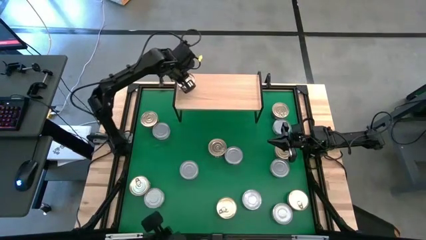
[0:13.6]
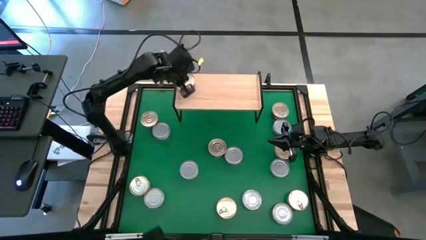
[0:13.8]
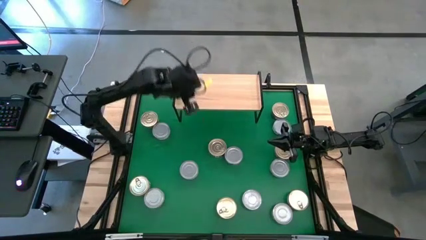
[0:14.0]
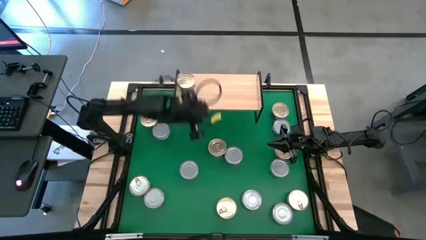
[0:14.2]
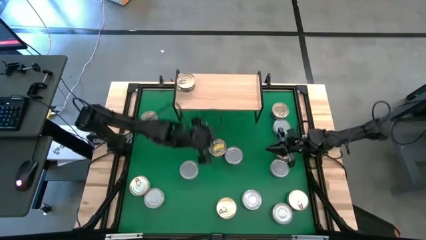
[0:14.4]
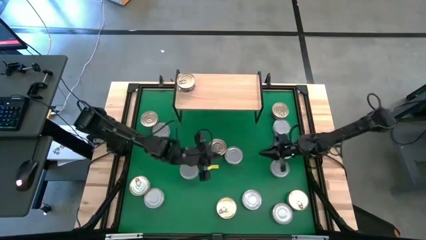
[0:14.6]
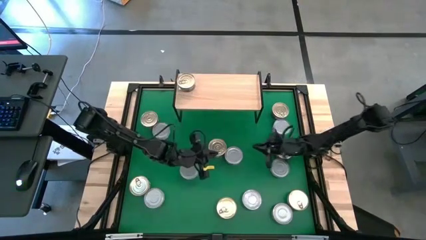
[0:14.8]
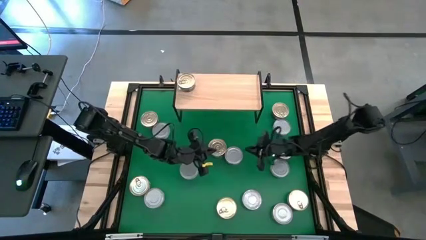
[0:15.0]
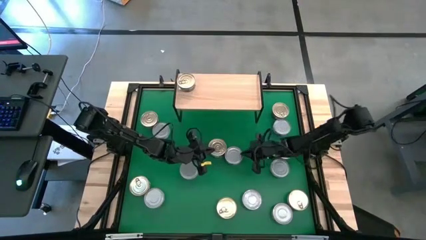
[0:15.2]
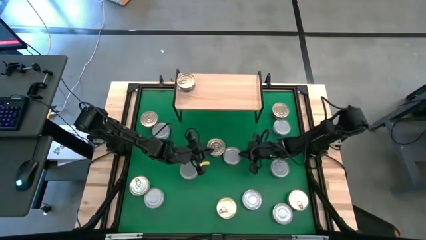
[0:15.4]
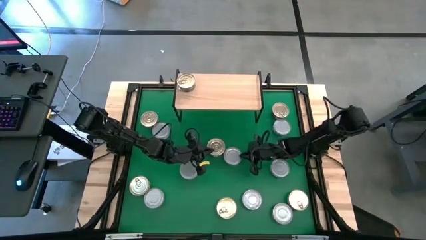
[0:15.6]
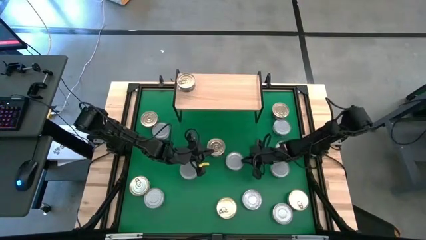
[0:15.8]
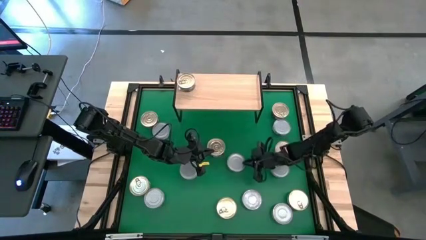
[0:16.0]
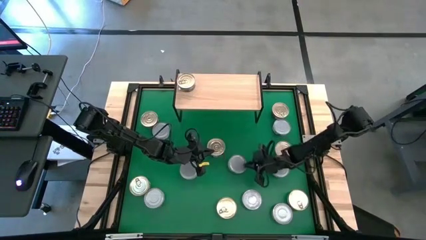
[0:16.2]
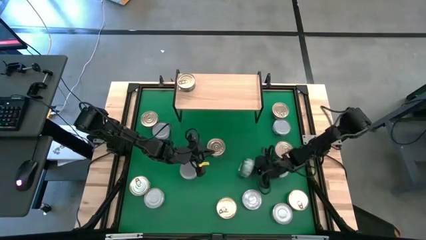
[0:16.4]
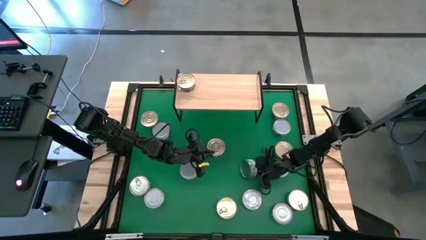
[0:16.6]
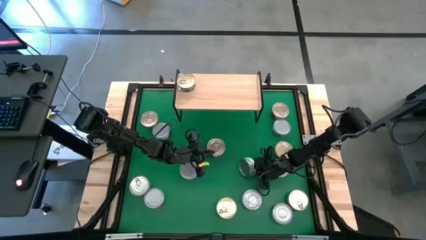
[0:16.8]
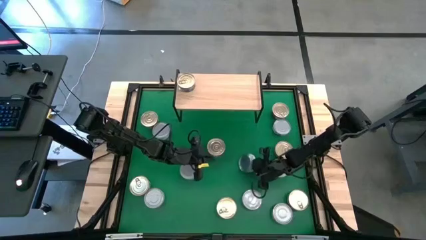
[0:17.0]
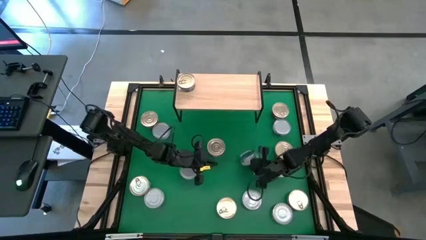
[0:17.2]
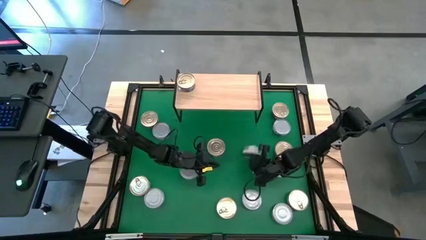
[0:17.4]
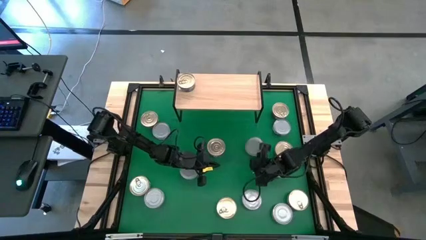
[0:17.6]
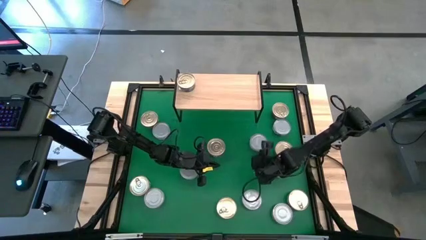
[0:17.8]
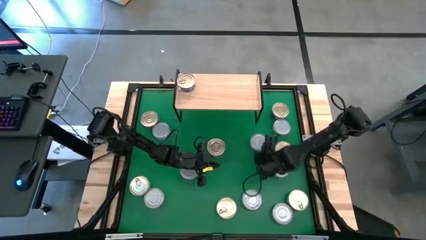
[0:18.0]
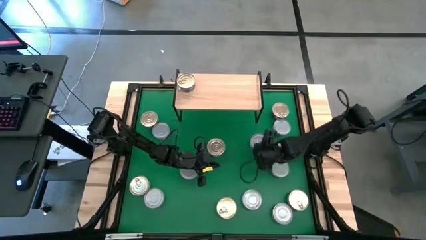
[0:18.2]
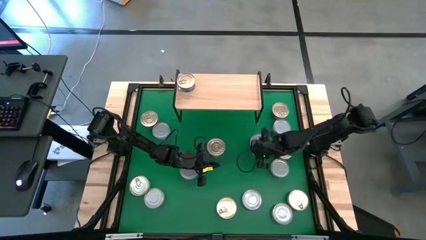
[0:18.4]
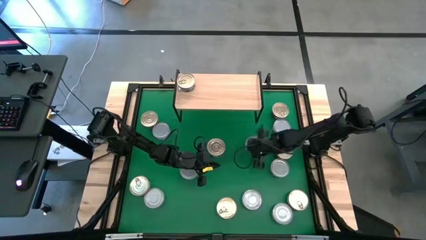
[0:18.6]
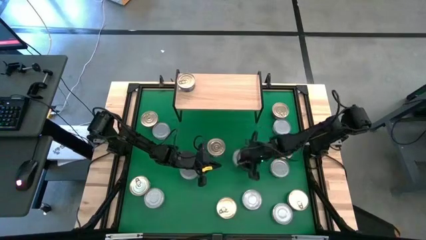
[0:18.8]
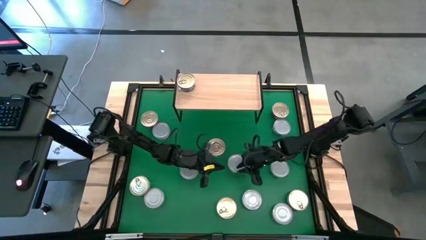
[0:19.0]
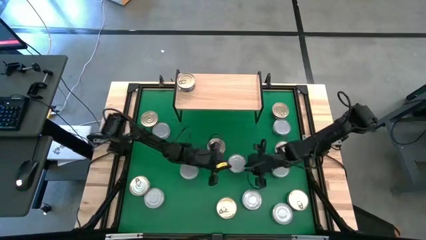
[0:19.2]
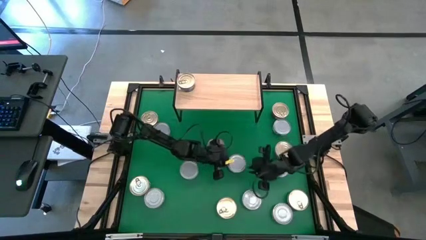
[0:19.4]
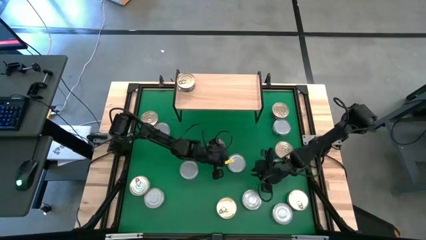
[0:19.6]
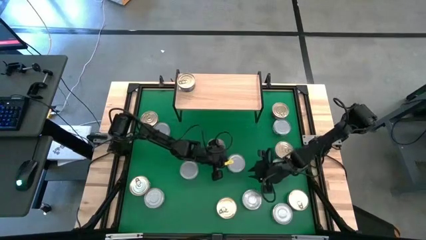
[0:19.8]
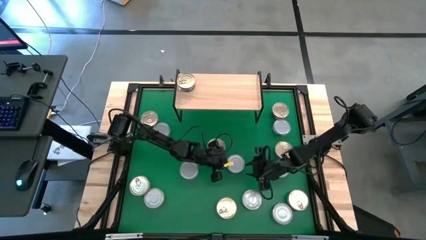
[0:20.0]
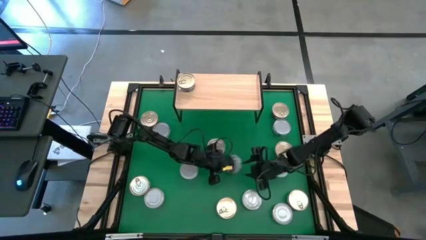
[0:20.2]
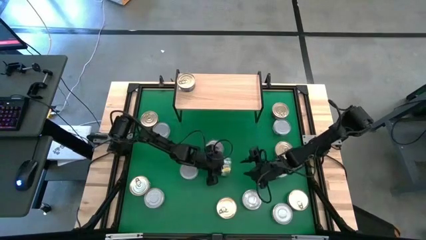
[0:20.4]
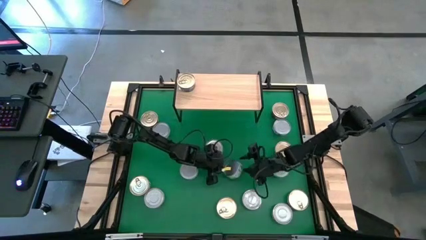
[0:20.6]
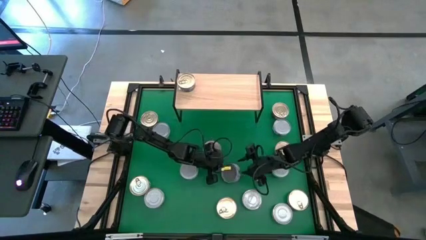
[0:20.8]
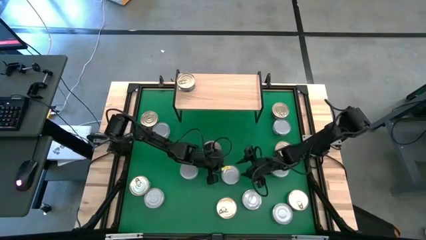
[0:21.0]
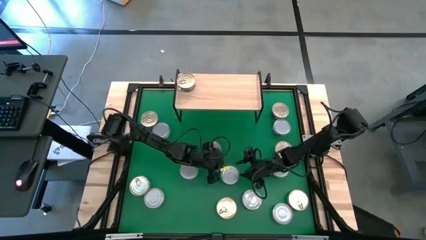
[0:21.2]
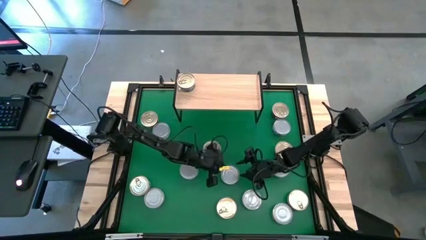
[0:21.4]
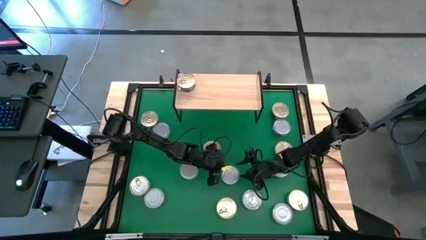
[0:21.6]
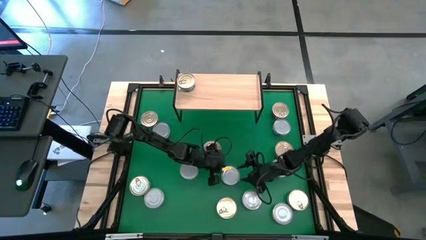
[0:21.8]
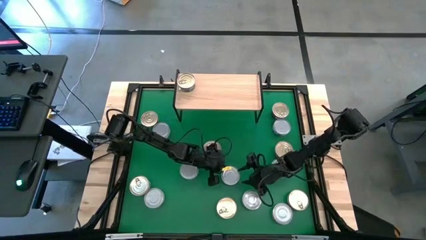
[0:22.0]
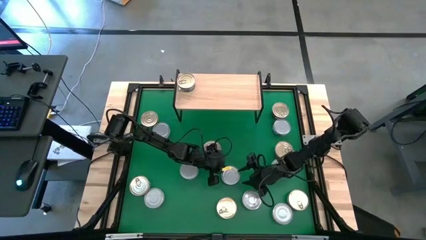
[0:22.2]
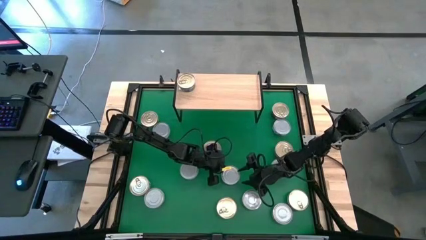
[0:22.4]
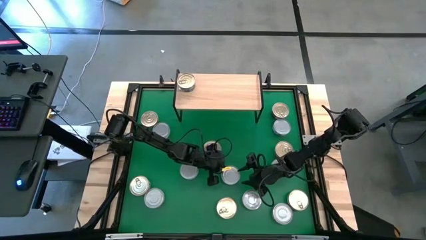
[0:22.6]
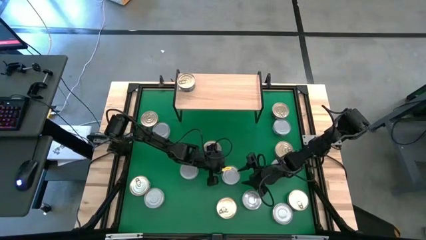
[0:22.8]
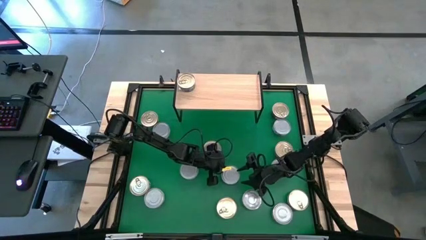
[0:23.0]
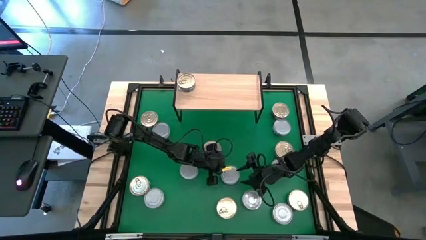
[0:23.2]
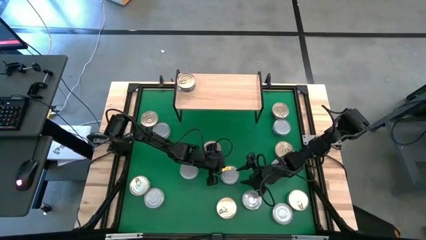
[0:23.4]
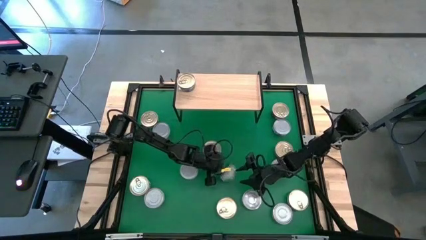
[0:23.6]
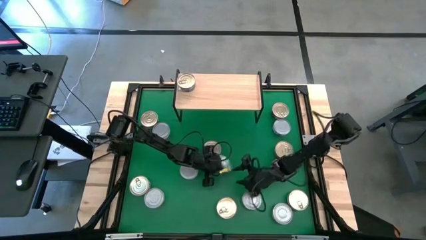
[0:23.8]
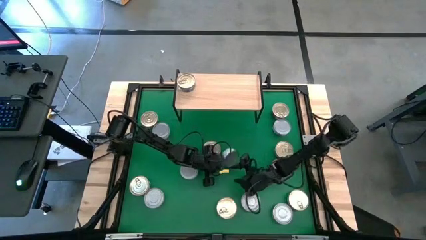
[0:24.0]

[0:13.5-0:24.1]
Task: Stack canned seafood by type on shelf
Put the green tuna can on the shelf

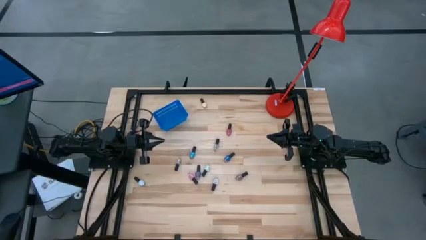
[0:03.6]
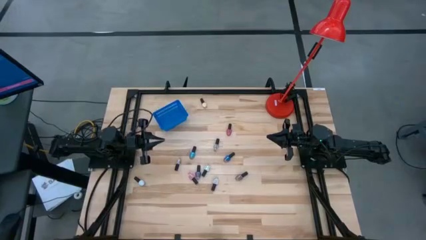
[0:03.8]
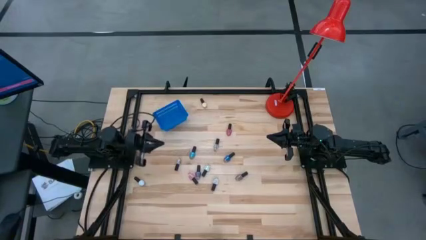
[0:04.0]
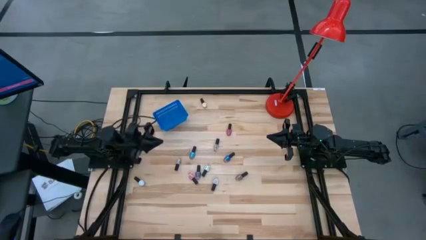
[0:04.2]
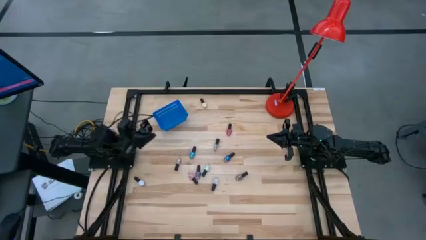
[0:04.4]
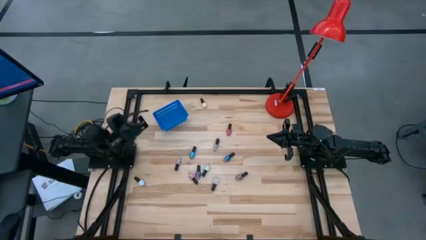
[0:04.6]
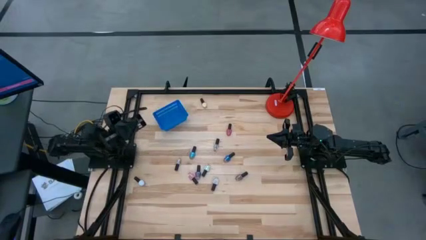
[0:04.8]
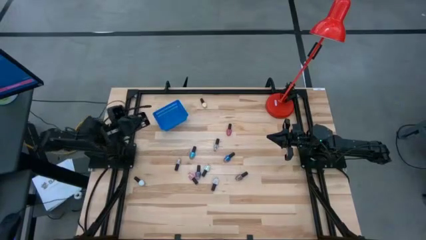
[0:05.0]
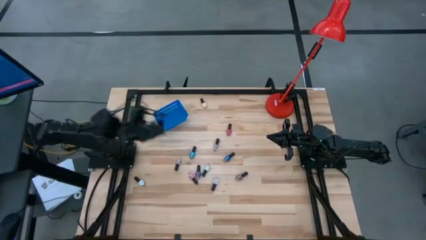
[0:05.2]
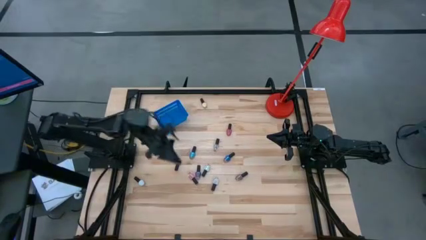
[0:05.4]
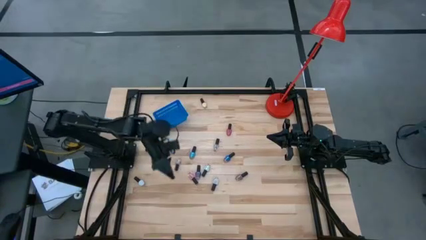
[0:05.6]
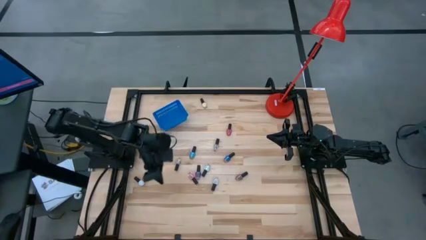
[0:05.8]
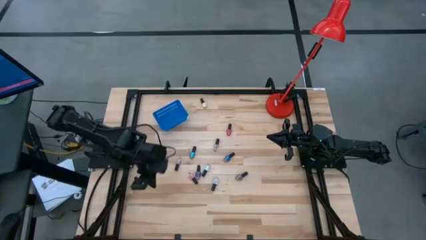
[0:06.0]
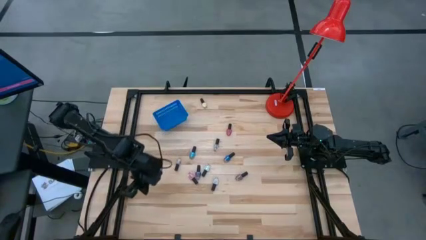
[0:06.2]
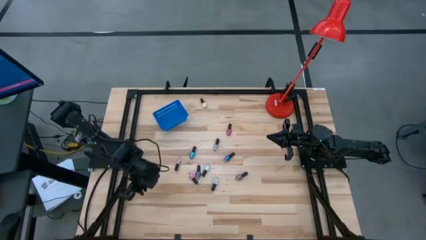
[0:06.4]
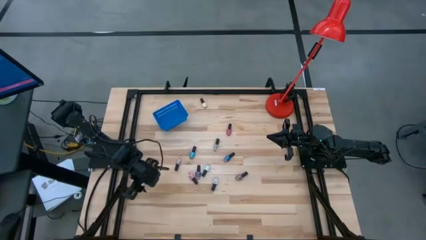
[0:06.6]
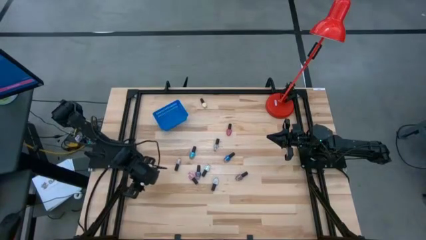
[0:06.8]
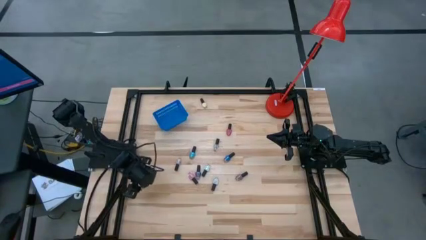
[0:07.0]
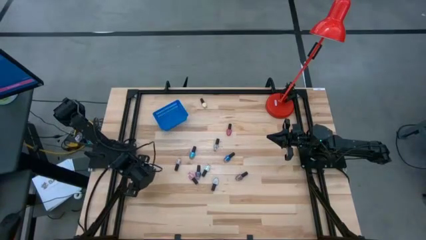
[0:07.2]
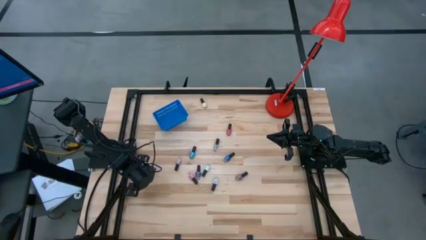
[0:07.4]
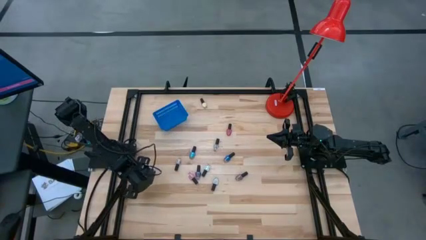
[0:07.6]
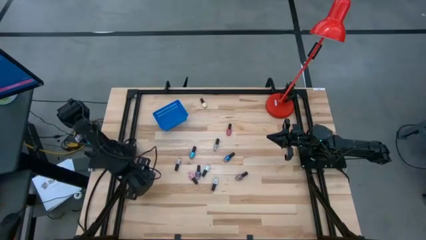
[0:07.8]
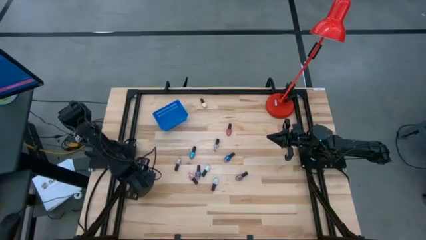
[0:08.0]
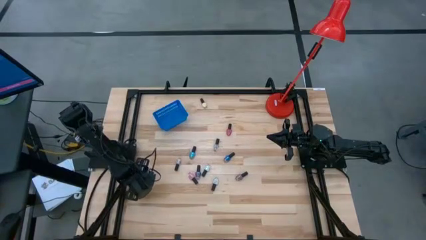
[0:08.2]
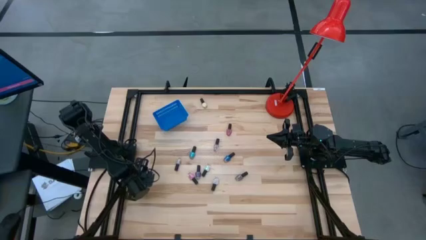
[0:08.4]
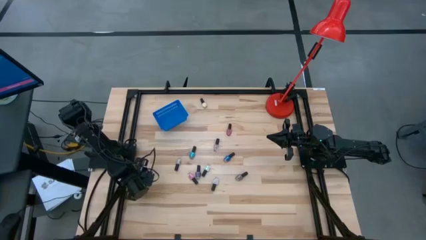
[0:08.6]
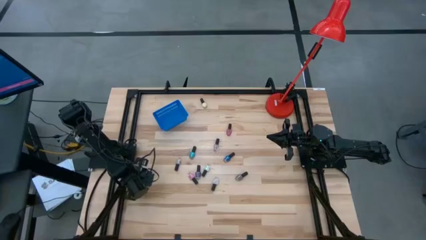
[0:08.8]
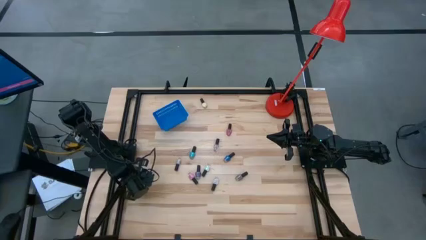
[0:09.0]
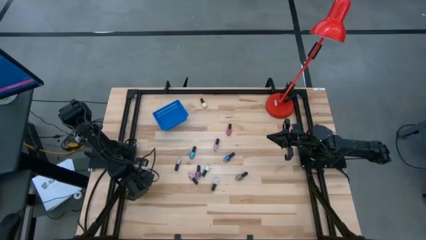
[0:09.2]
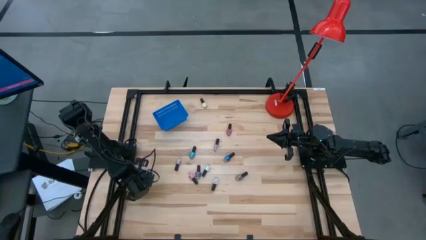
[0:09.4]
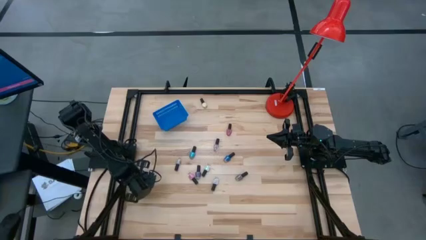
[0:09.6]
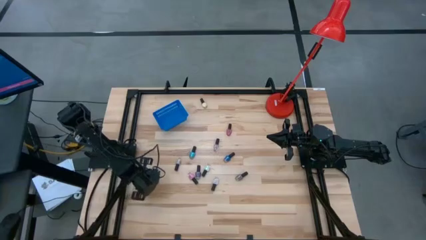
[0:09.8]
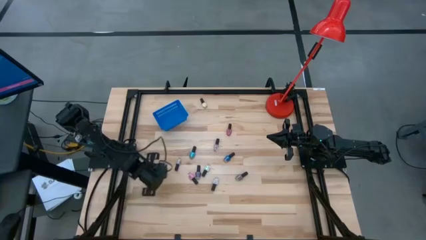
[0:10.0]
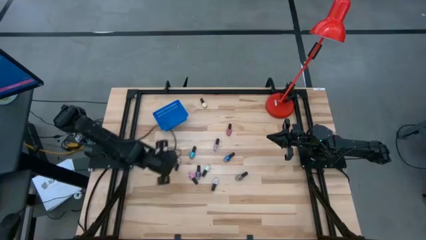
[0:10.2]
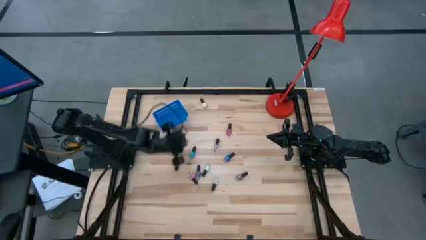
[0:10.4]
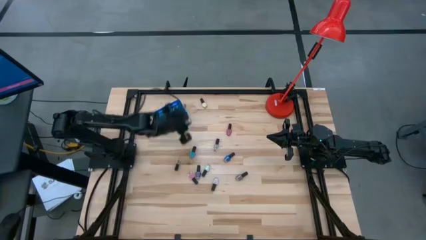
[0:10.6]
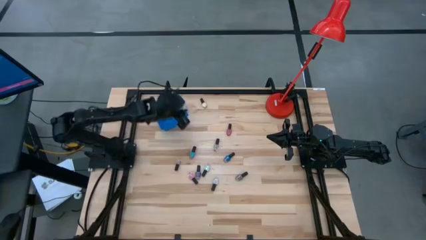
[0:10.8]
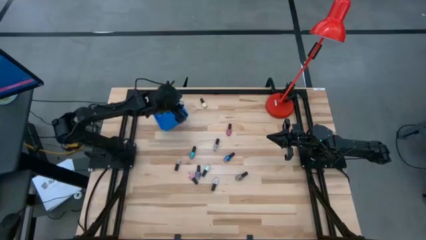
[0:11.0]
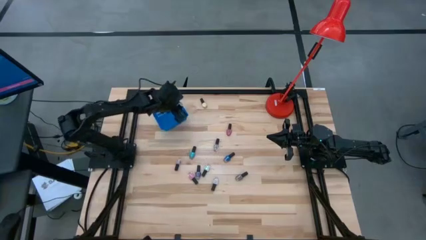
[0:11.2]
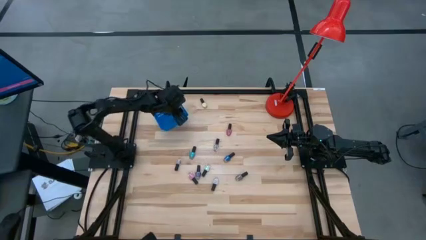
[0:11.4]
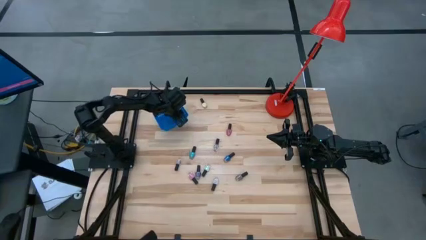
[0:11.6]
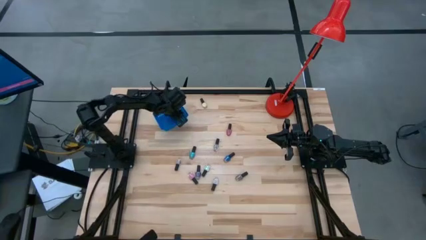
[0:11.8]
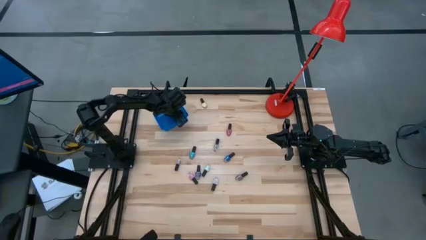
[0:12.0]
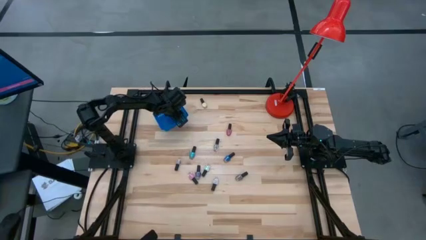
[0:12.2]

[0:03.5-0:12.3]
Task: Pick & Place Nail Polish
Put the white nail polish bottle into the blue bin
